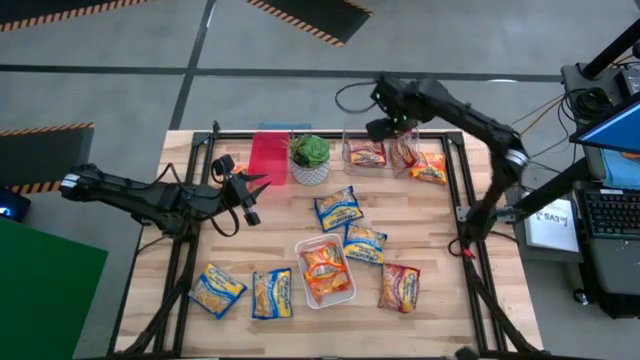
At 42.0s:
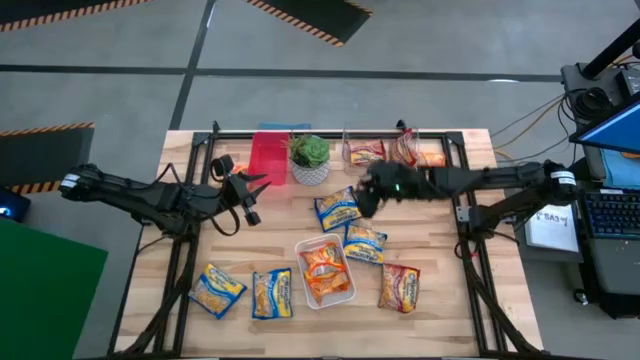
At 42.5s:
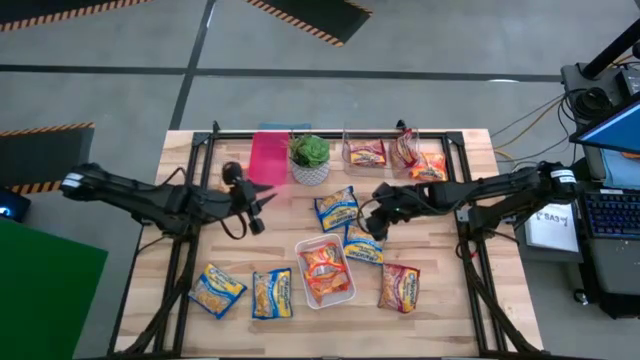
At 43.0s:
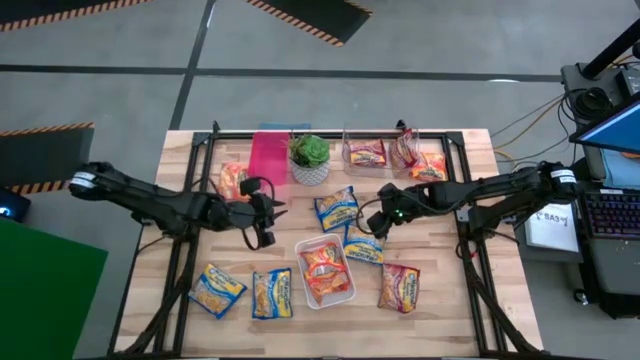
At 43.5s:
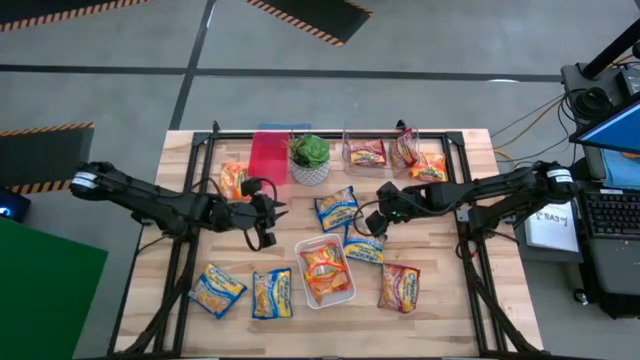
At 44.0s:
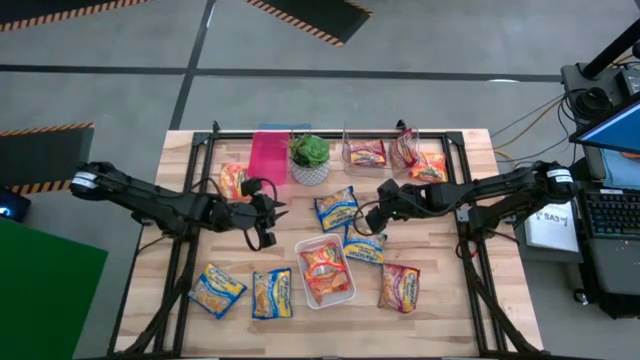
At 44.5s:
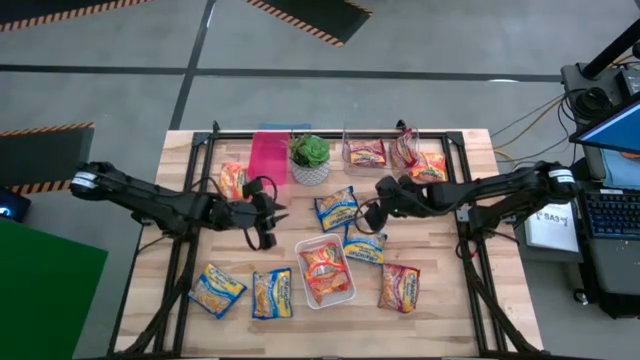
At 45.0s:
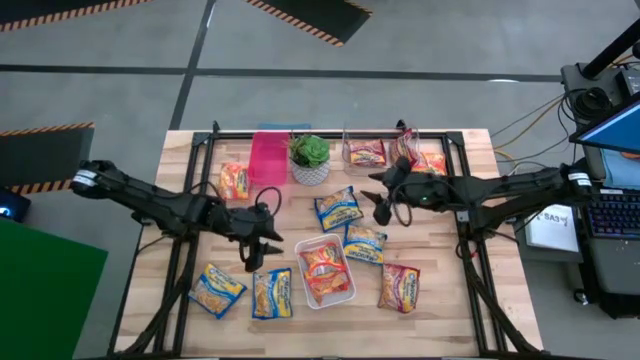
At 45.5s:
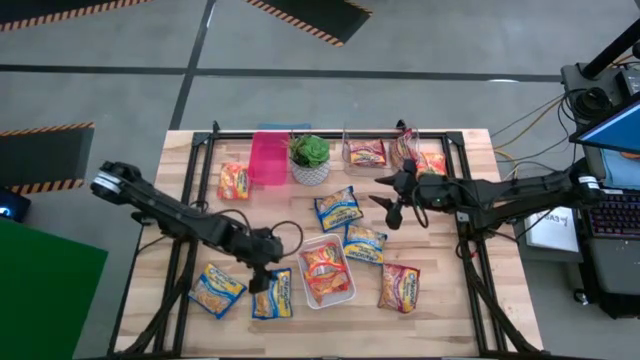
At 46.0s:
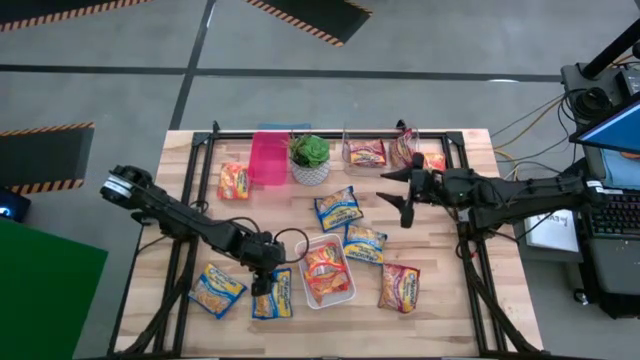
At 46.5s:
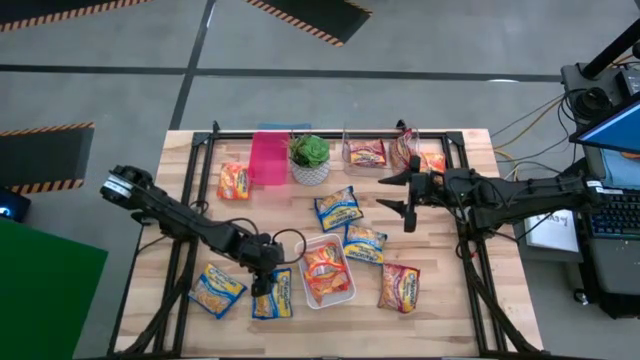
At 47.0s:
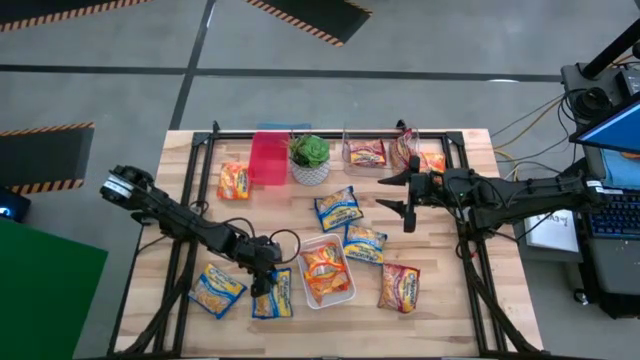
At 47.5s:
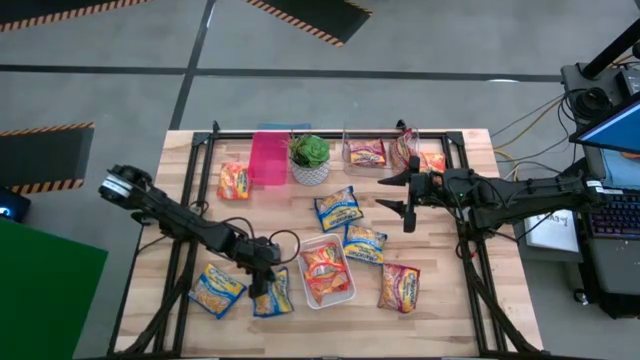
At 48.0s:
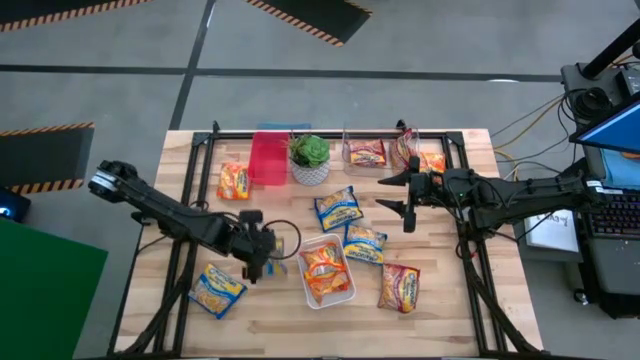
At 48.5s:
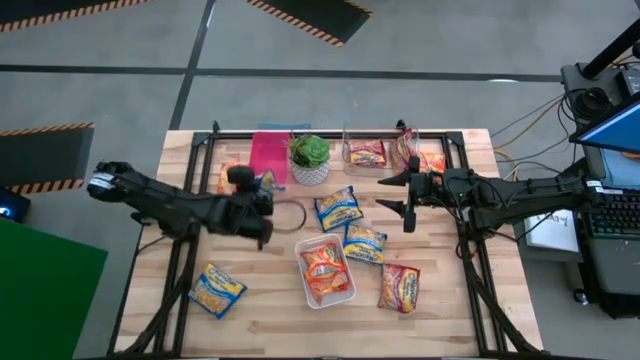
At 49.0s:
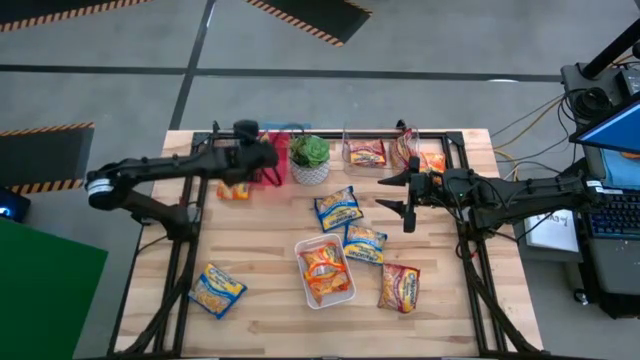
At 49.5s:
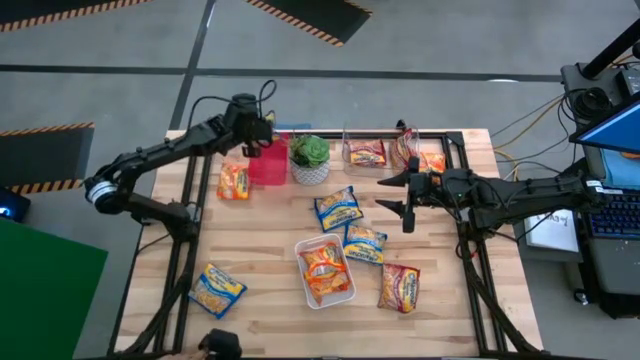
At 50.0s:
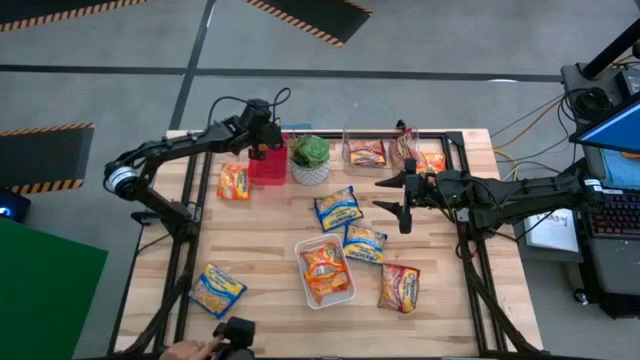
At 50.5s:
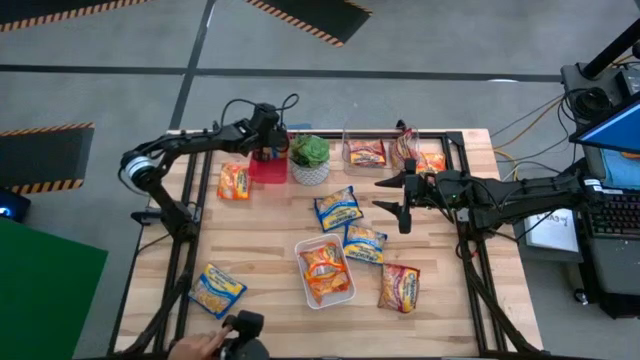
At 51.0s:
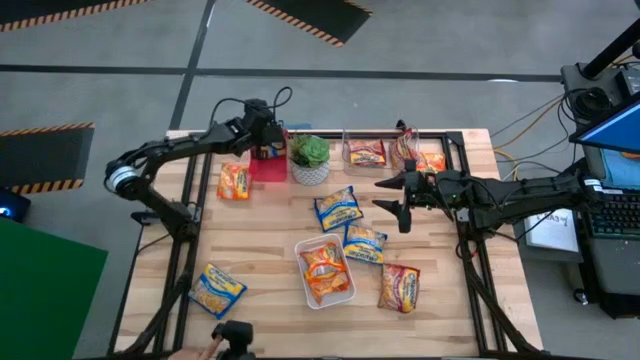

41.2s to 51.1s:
Task: Sort Maruchan noodles
Put the blue noodle pack into the red bin

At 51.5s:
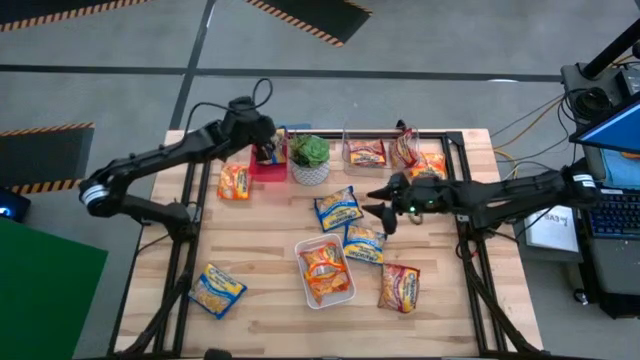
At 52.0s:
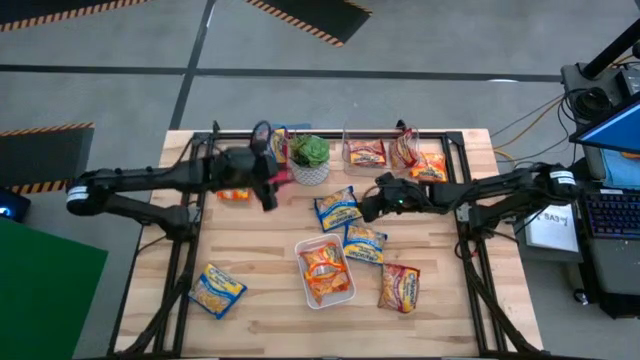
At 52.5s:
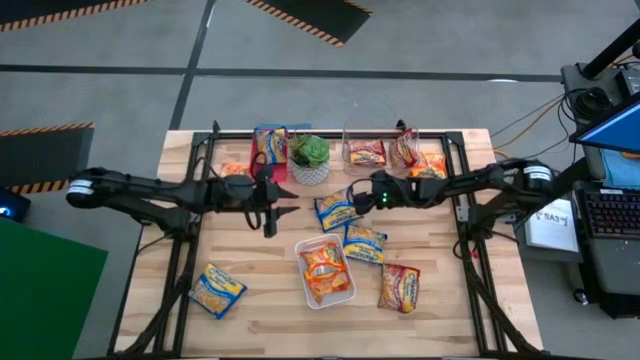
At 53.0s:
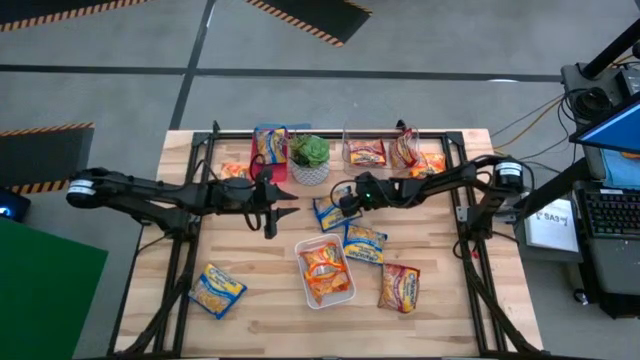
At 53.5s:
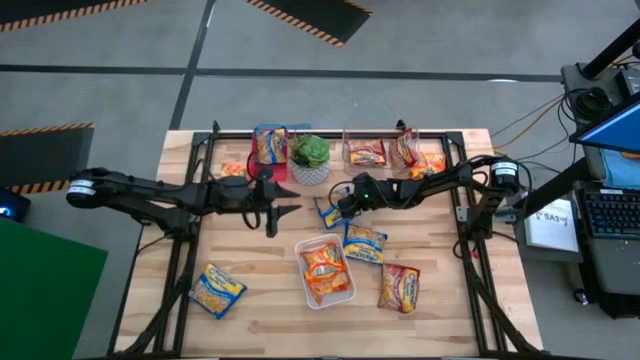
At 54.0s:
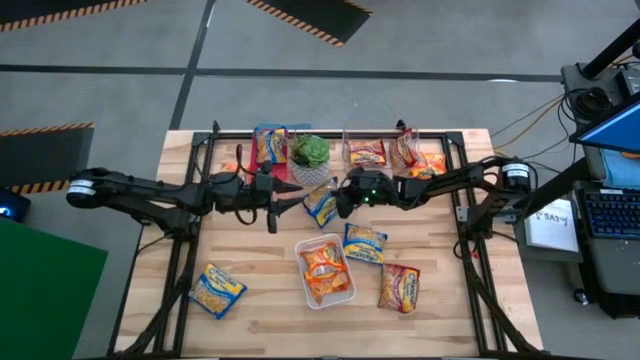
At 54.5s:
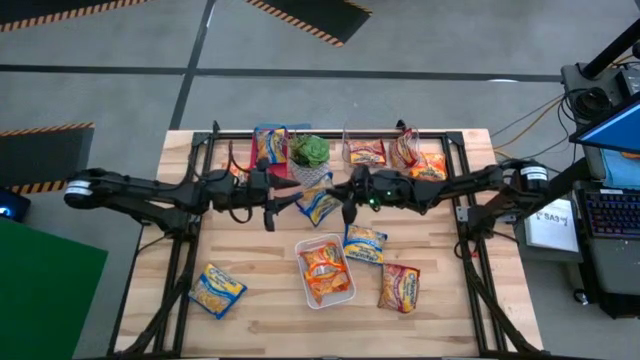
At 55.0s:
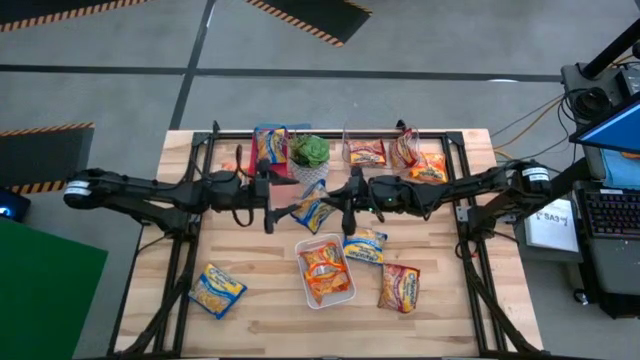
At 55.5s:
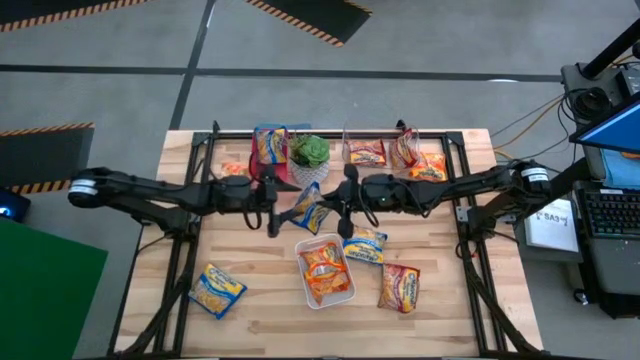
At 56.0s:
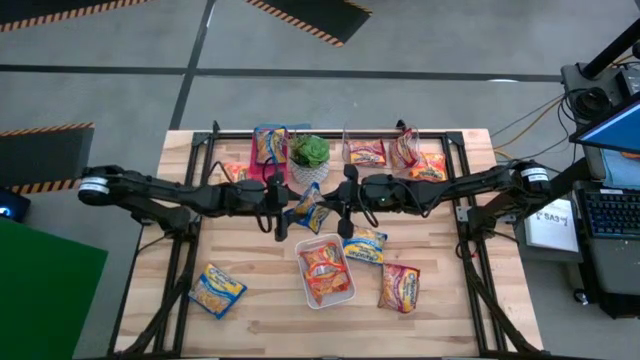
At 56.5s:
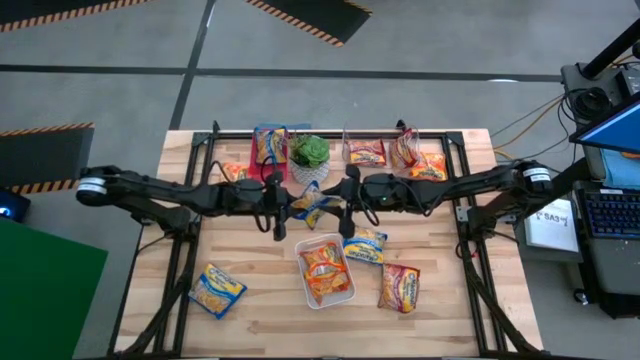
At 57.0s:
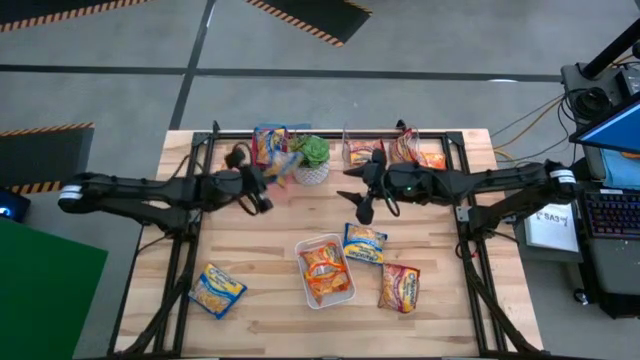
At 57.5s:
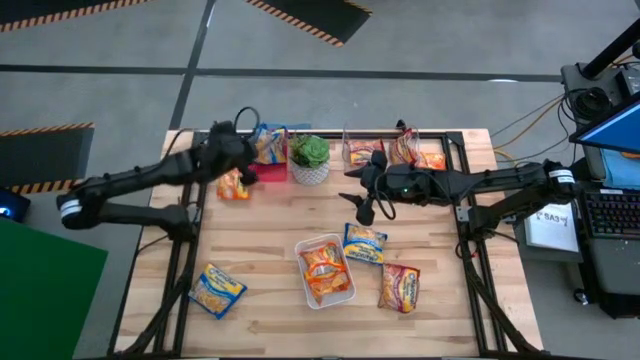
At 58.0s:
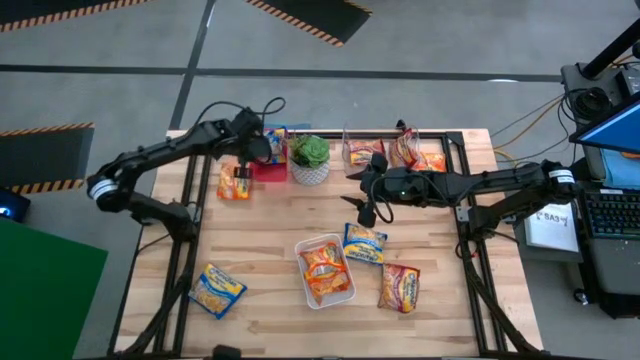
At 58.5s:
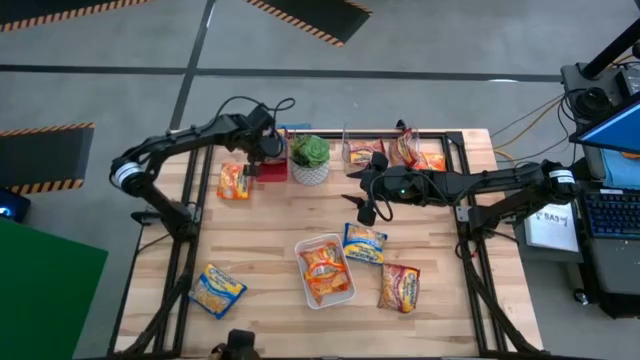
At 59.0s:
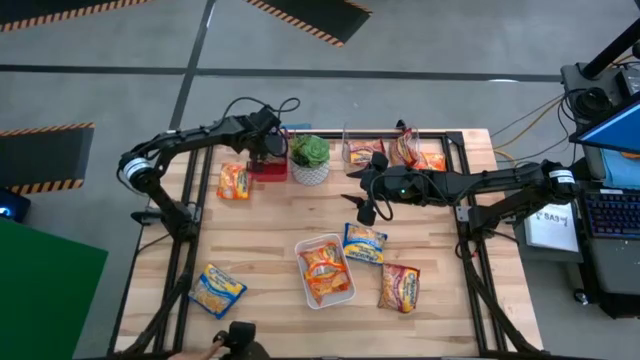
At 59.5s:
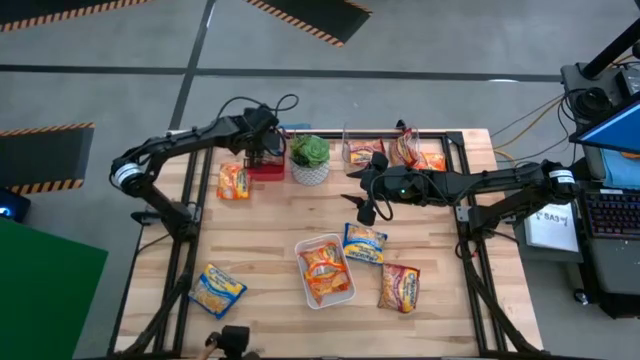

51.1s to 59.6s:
Put the blue noodle pack into the red bin

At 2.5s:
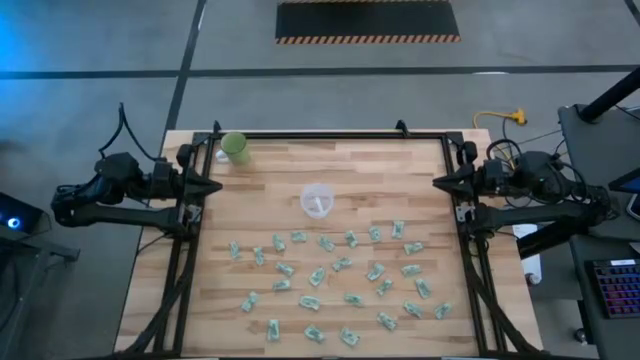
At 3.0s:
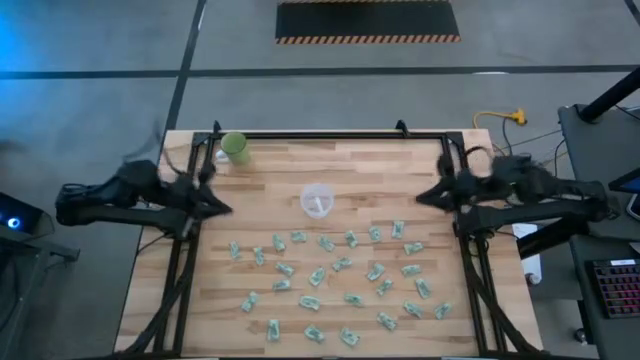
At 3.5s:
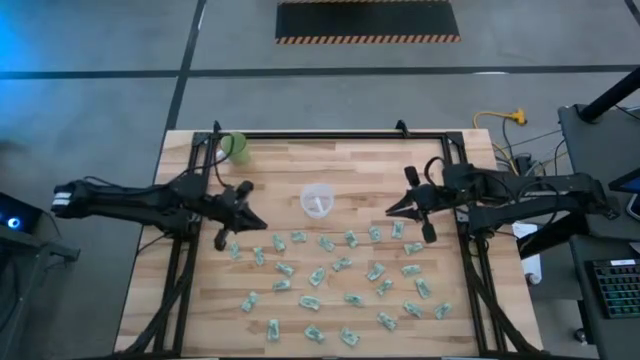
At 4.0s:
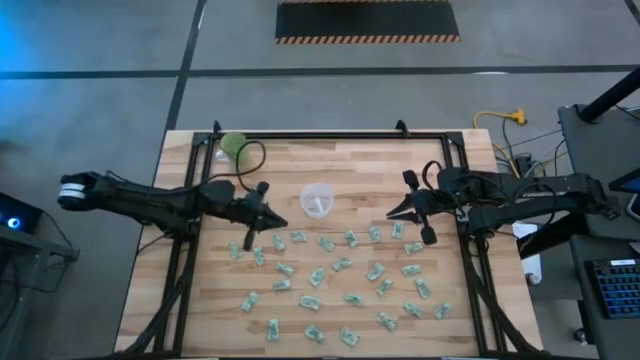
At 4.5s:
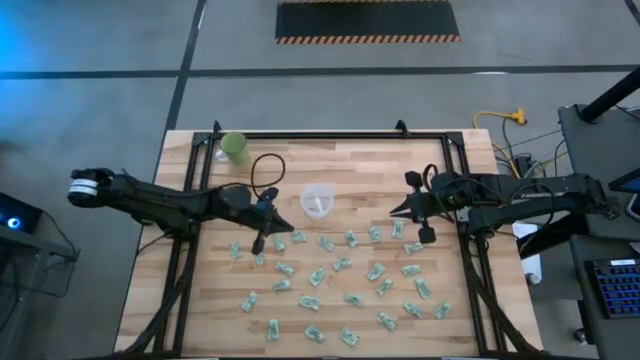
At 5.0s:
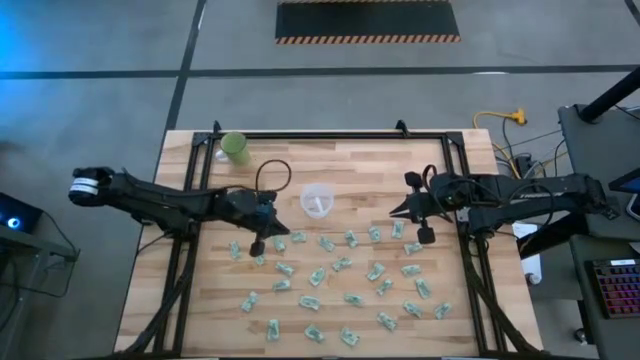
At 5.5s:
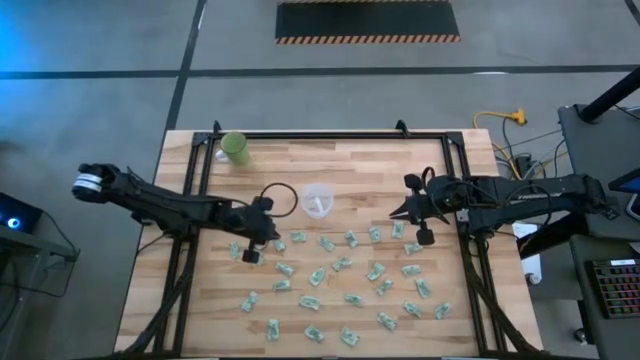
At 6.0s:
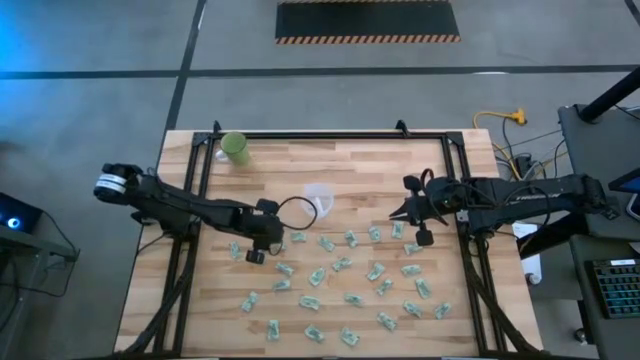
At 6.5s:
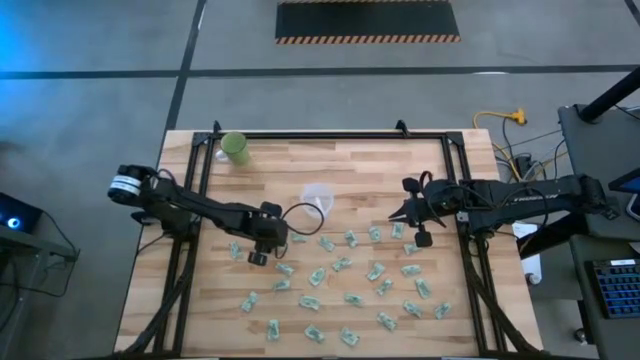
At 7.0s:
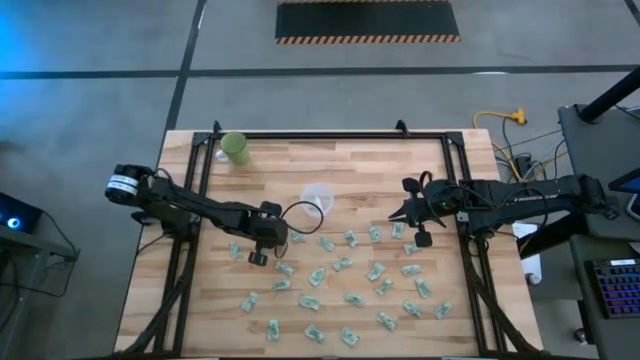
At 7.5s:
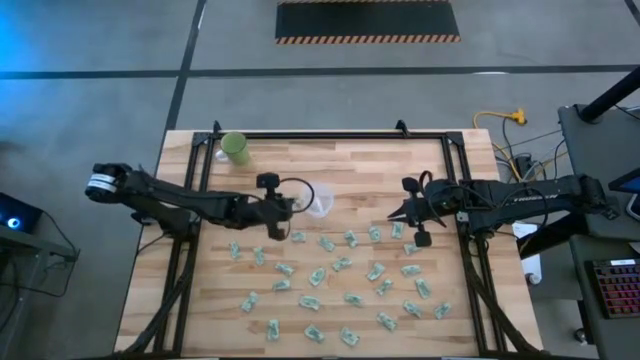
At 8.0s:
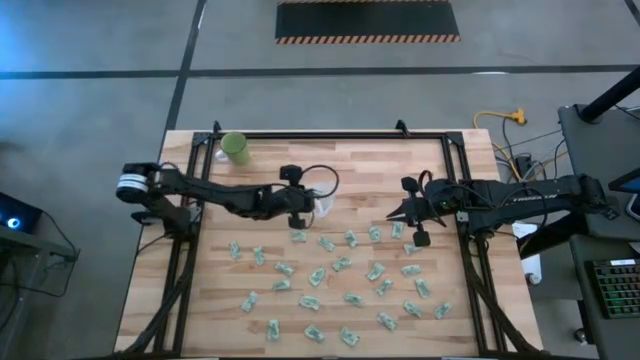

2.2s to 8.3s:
Task: Pick and place Stevia / Truvia into bins
Put the green stevia packet into the transparent container
